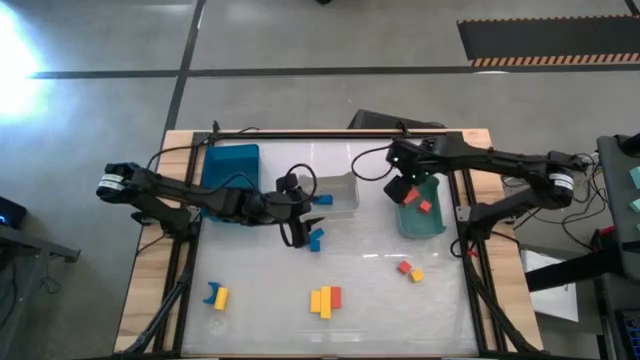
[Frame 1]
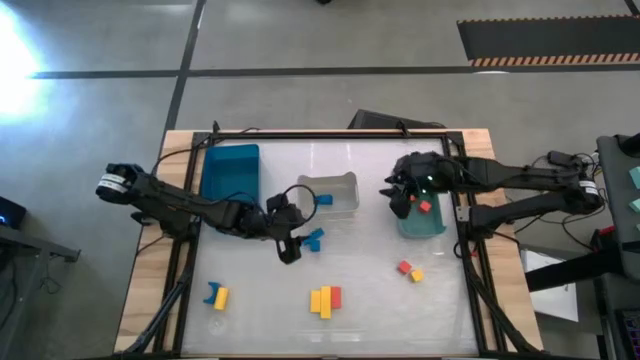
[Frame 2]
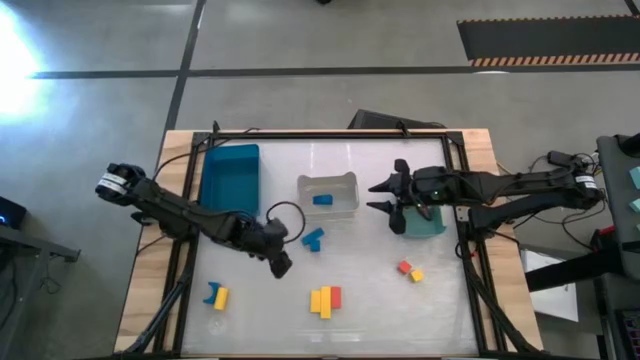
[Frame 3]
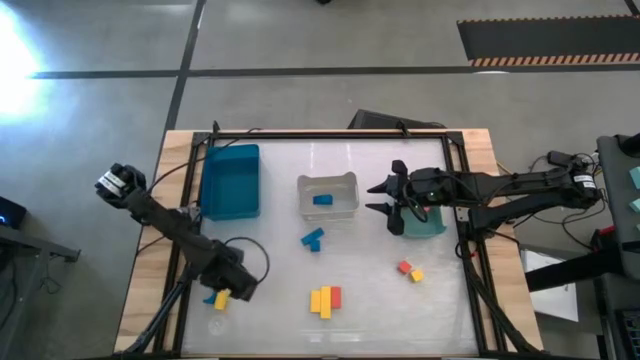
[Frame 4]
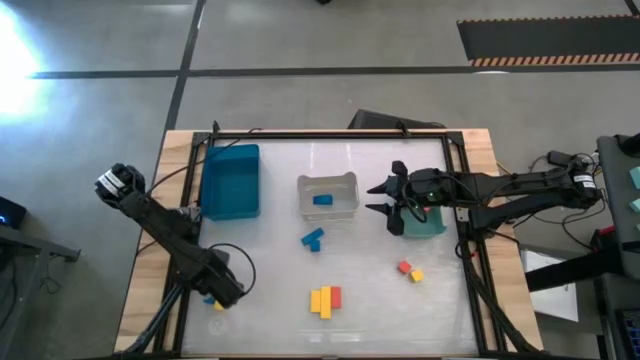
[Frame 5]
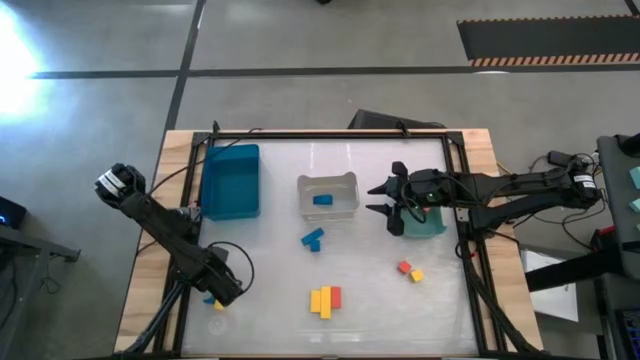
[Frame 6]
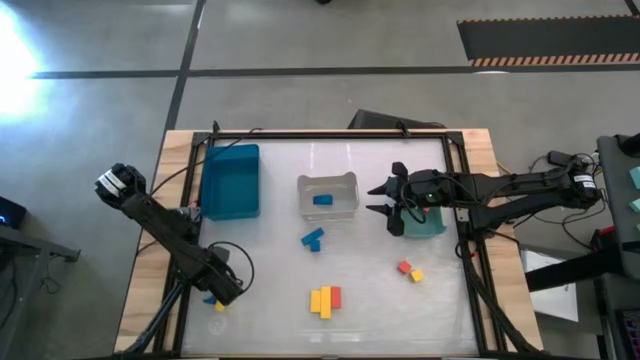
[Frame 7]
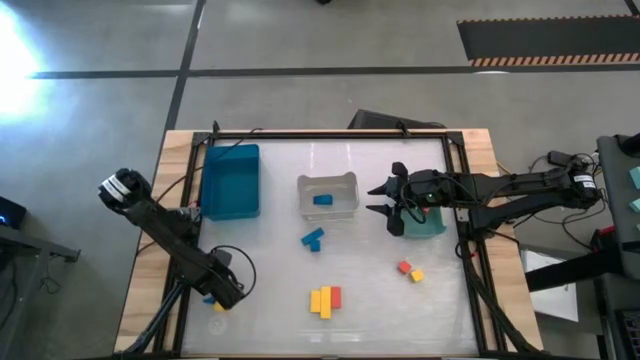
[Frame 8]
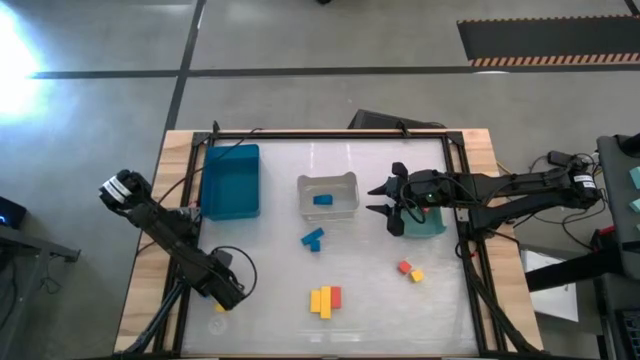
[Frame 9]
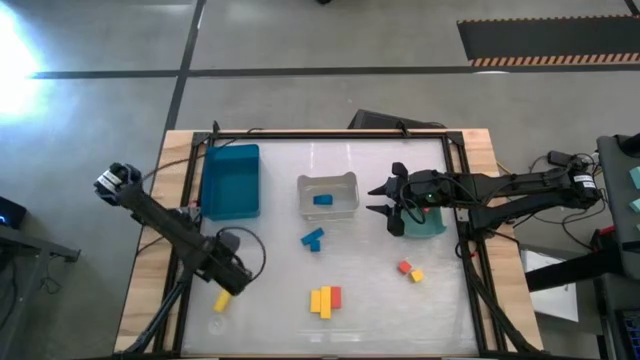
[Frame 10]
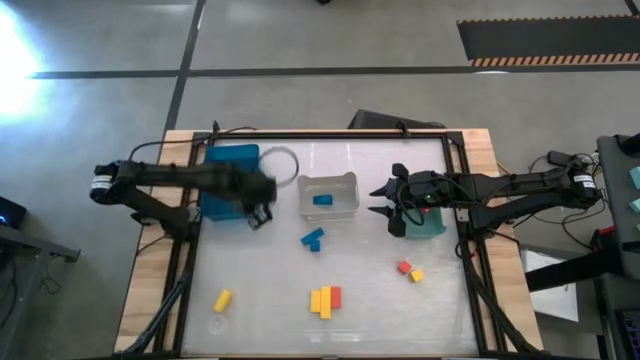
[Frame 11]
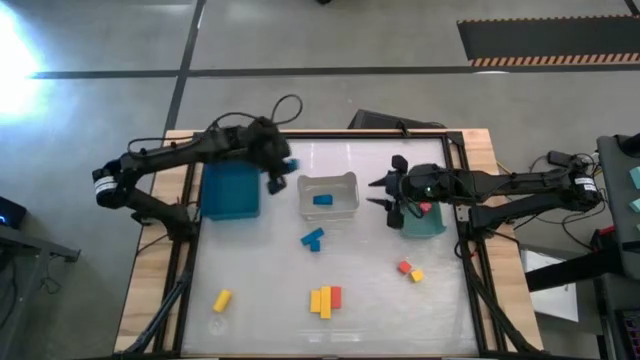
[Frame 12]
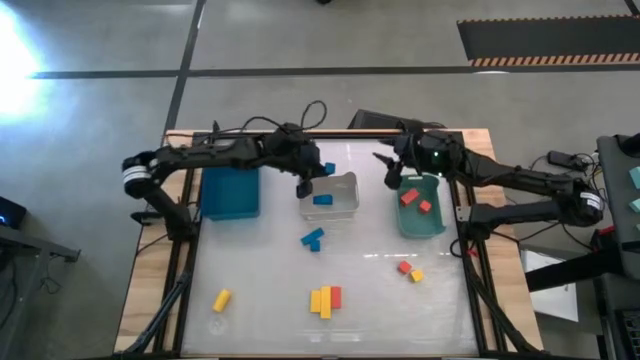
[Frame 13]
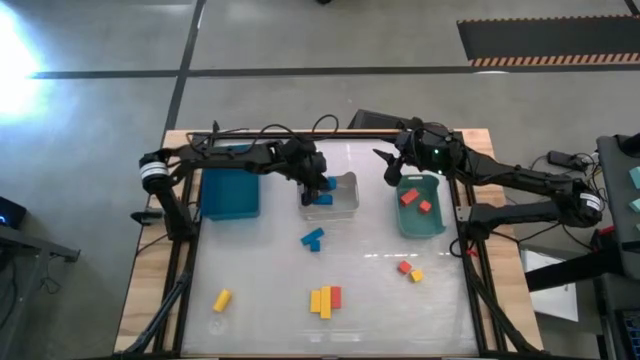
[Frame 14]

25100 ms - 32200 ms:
Task: Sort & place blocks by color
Put the blue block into the gray bin

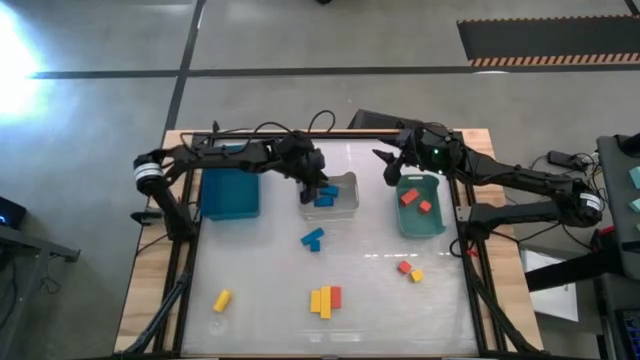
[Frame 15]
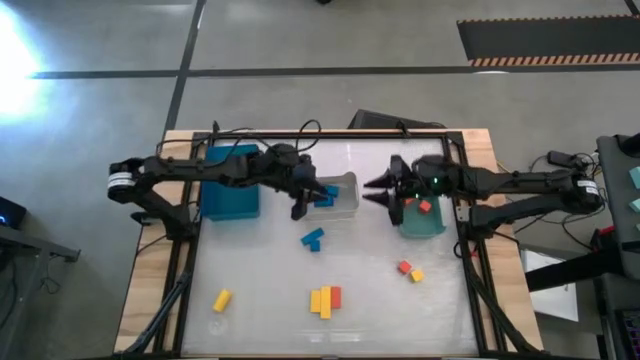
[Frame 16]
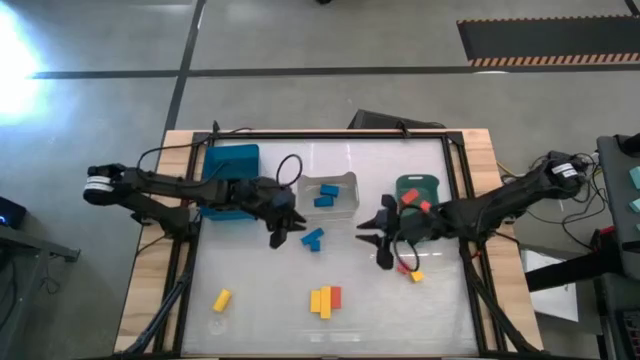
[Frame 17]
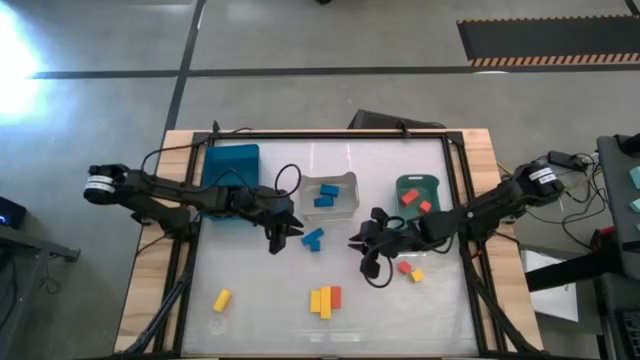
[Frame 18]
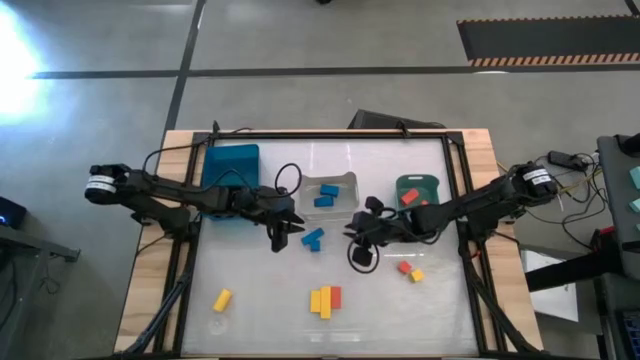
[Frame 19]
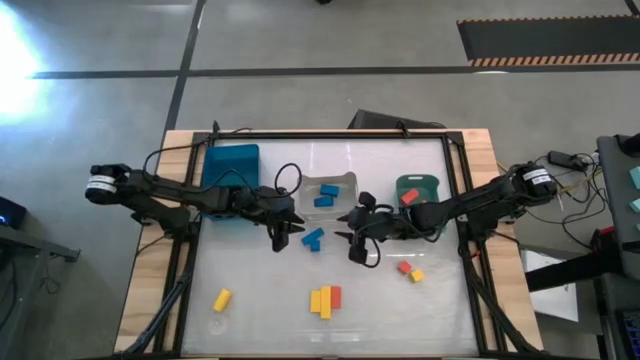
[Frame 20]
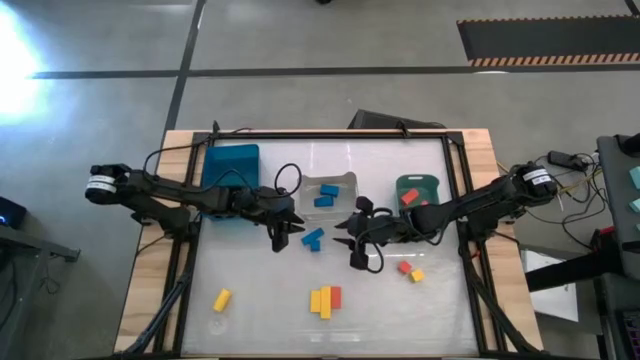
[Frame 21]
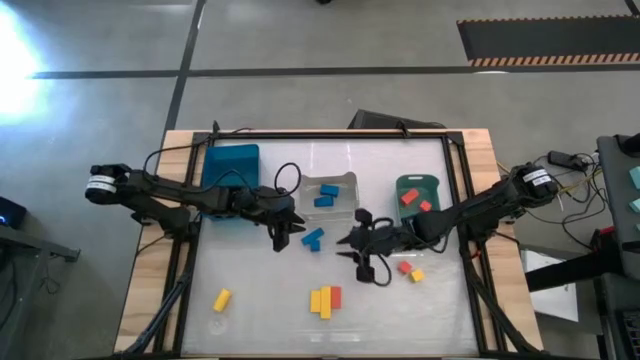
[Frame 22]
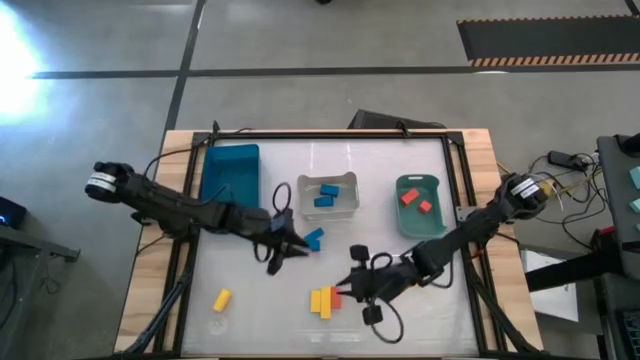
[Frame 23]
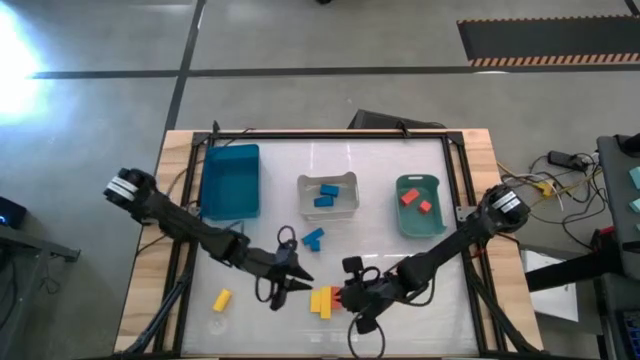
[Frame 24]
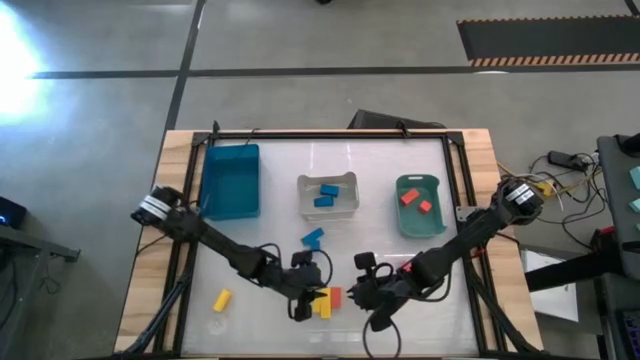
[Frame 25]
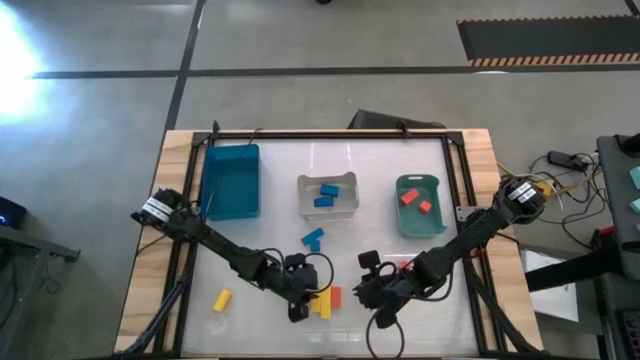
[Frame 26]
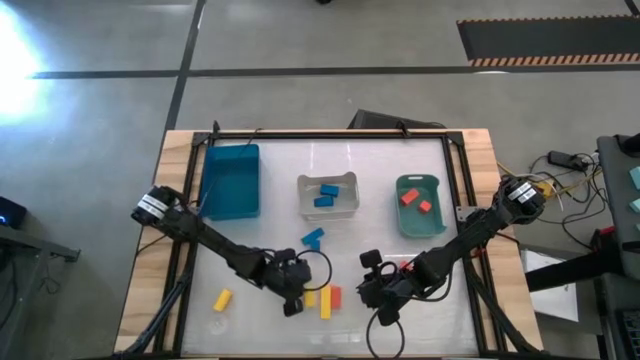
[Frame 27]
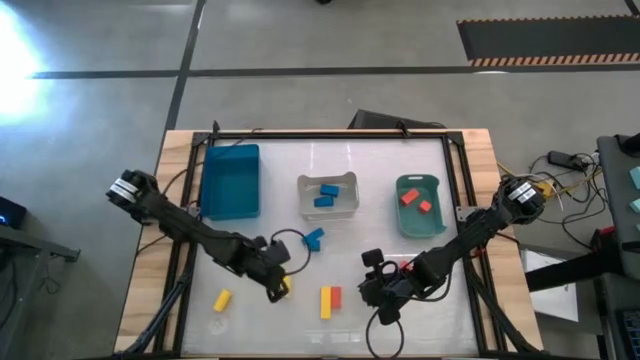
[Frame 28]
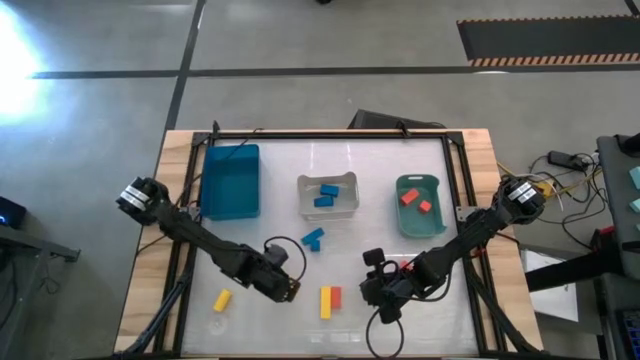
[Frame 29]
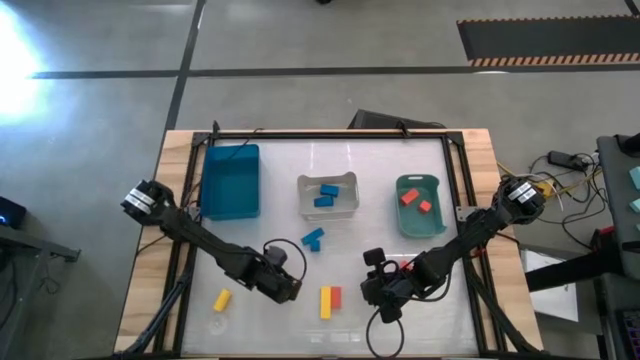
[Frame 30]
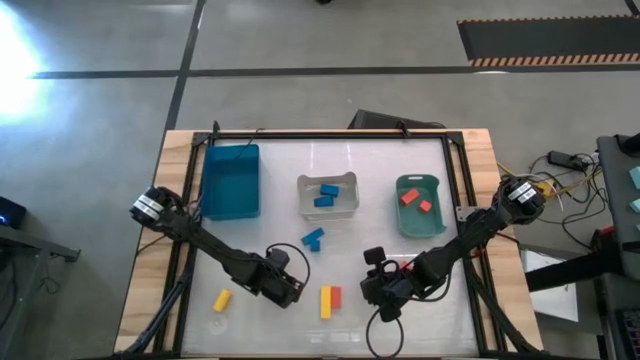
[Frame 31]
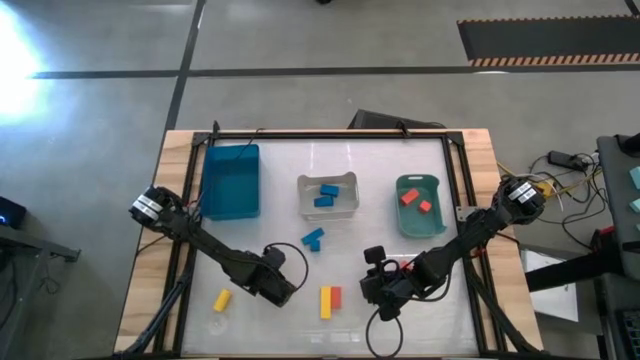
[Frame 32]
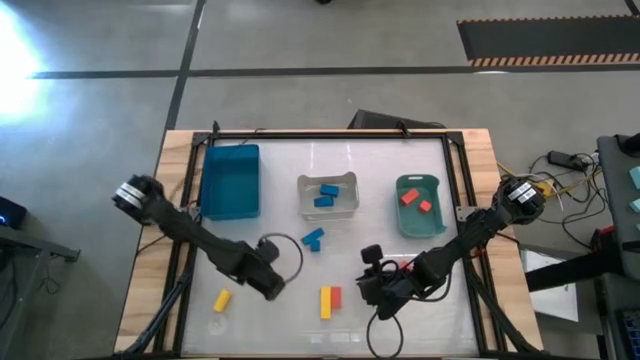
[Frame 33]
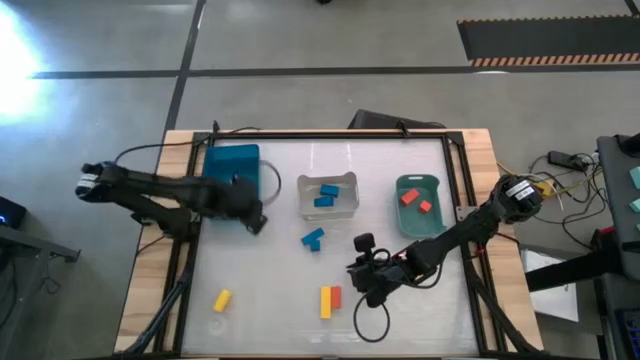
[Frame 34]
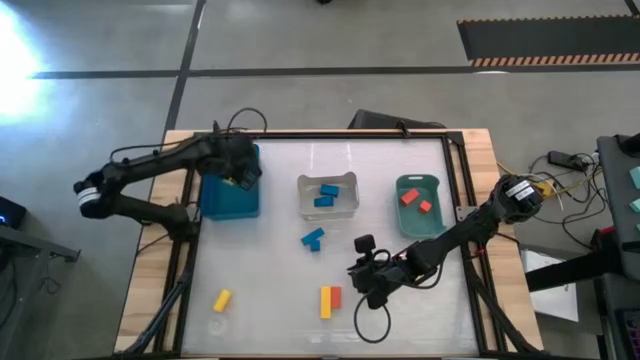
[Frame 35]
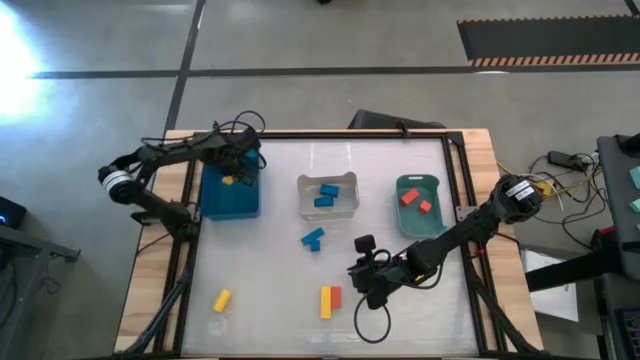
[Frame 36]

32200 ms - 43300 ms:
Put the yellow block into the blue bin

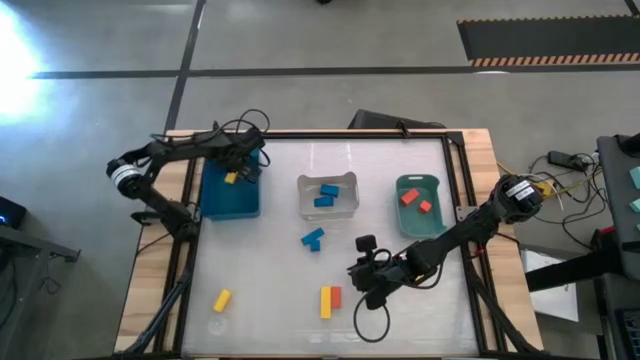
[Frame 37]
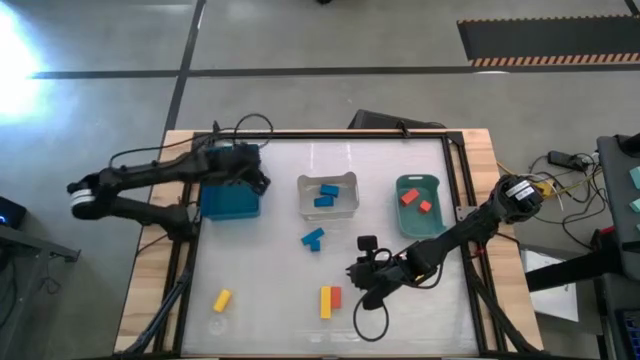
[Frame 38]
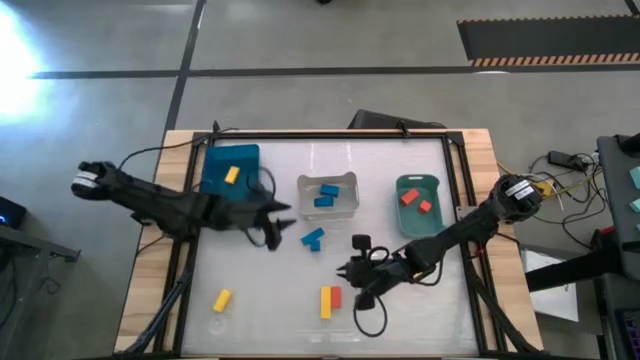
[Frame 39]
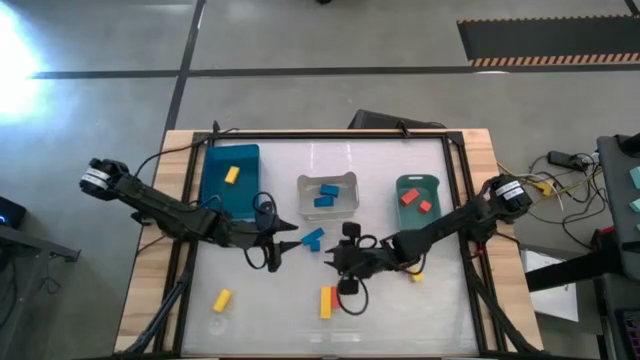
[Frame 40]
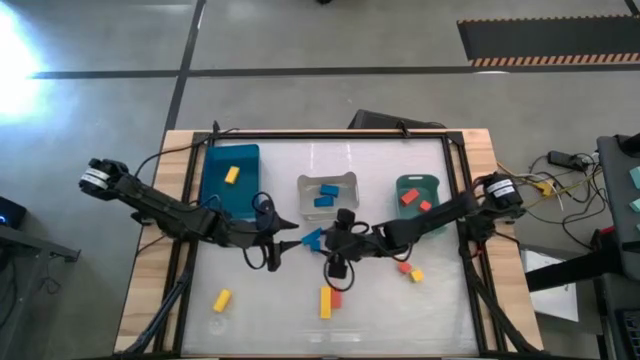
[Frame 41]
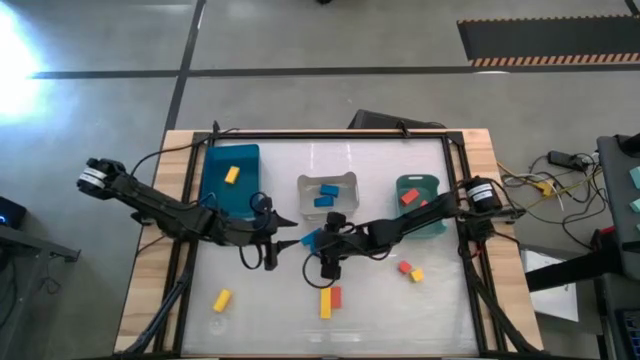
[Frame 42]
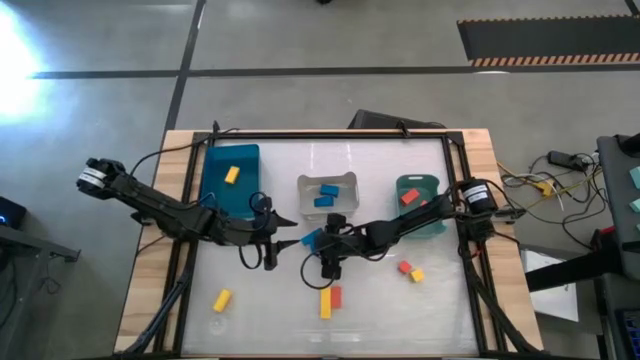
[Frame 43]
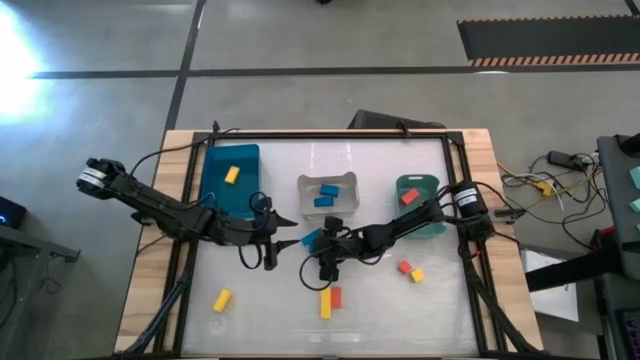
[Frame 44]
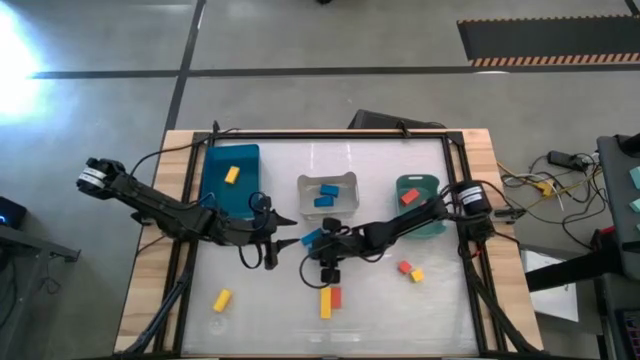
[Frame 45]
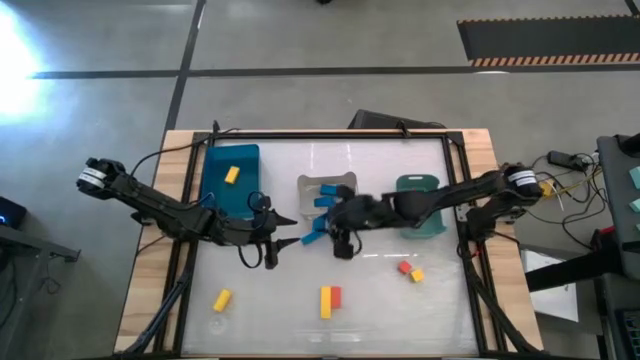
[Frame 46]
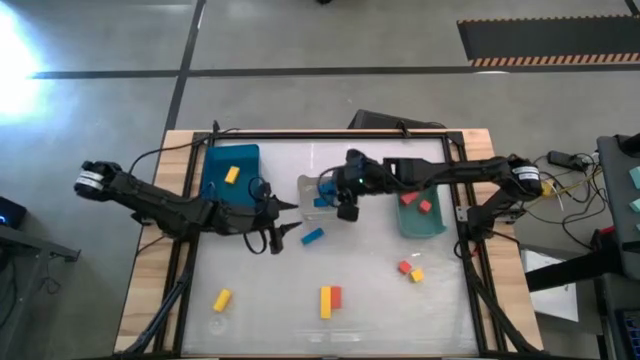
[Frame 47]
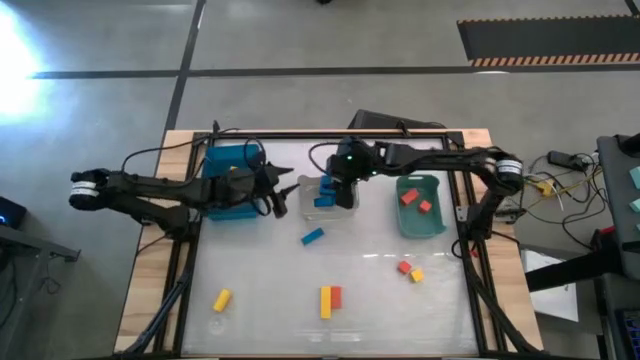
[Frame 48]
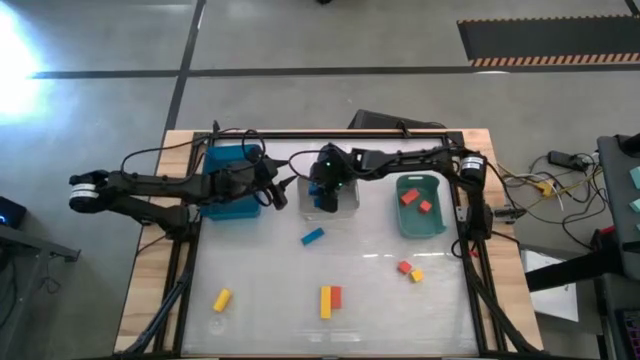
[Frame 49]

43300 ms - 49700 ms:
Put the blue block into the gray bin
